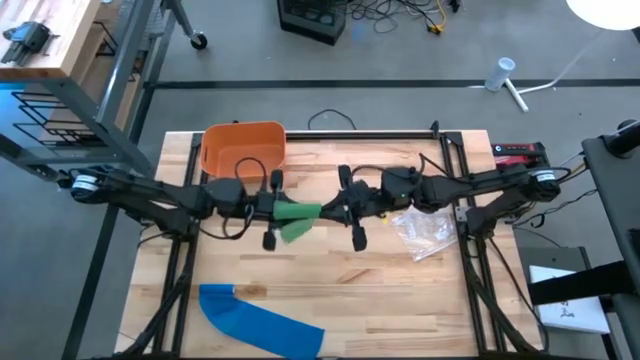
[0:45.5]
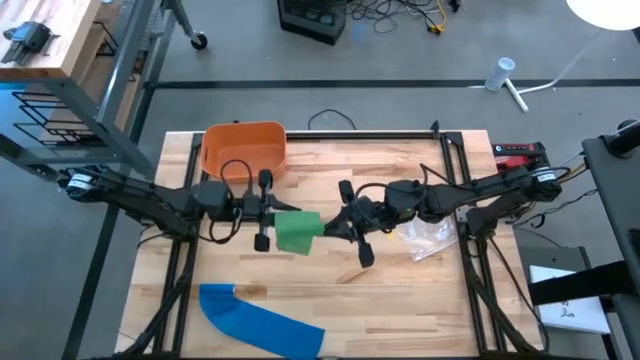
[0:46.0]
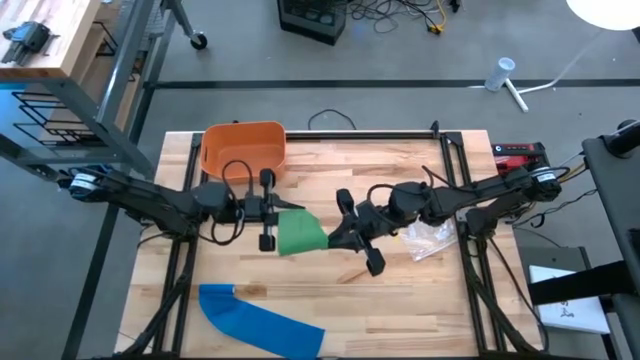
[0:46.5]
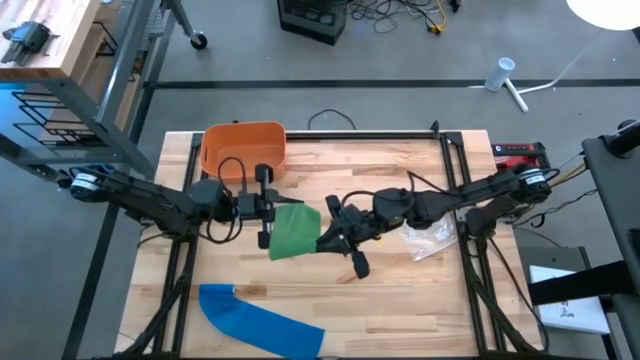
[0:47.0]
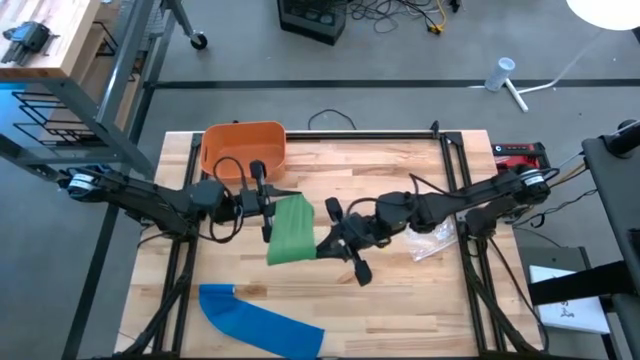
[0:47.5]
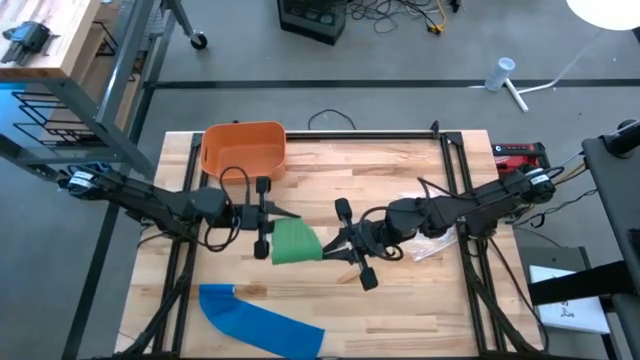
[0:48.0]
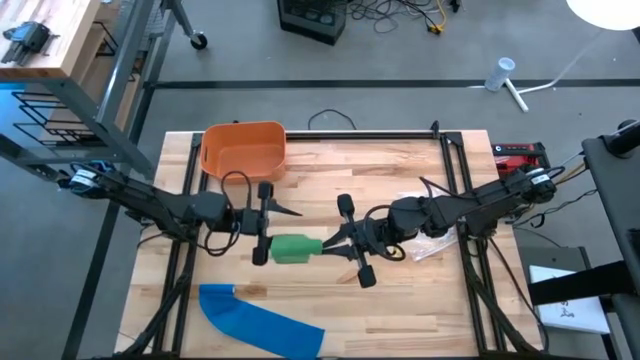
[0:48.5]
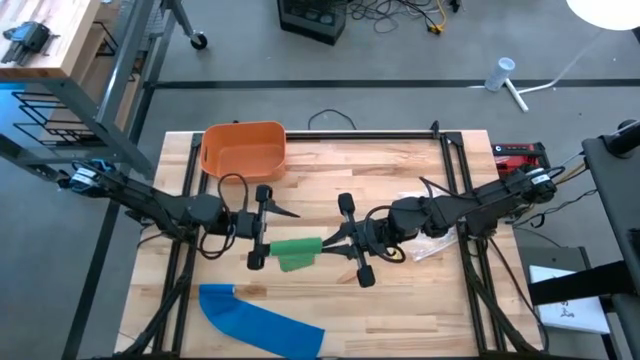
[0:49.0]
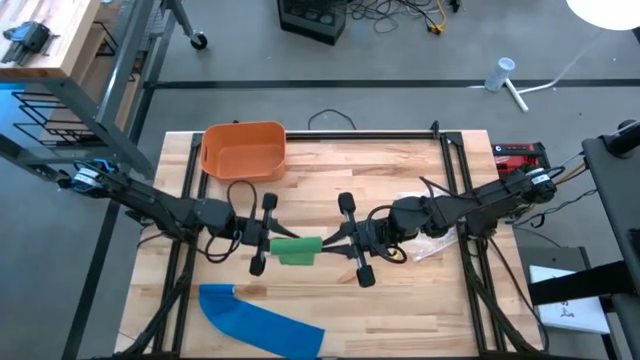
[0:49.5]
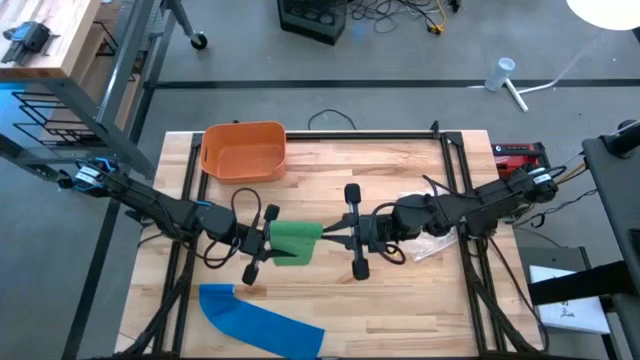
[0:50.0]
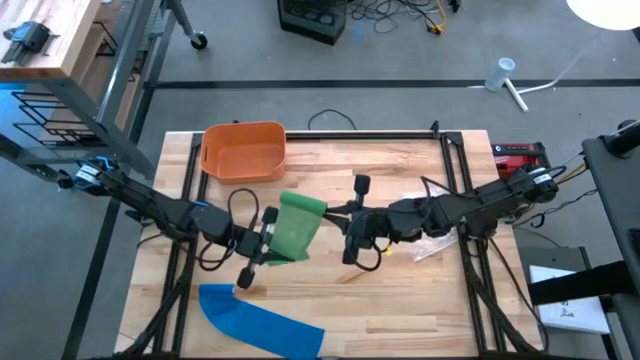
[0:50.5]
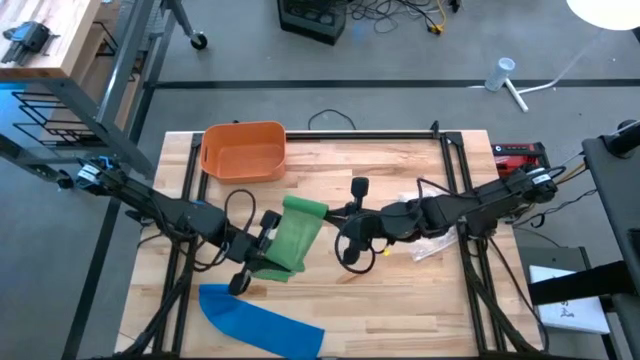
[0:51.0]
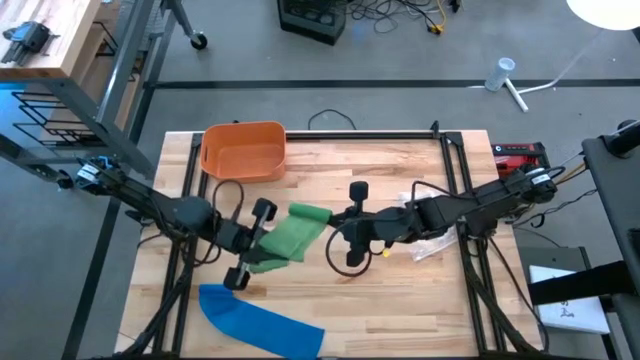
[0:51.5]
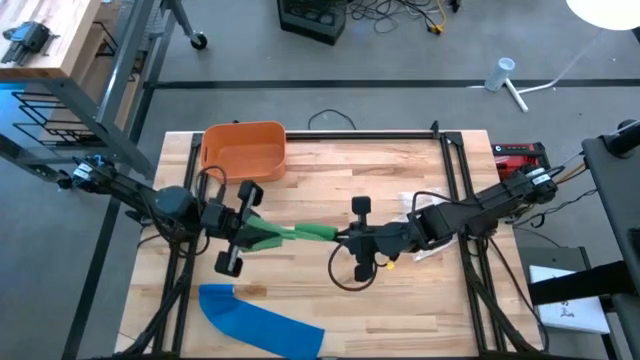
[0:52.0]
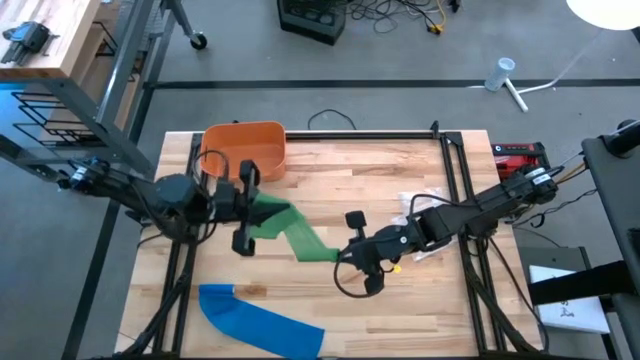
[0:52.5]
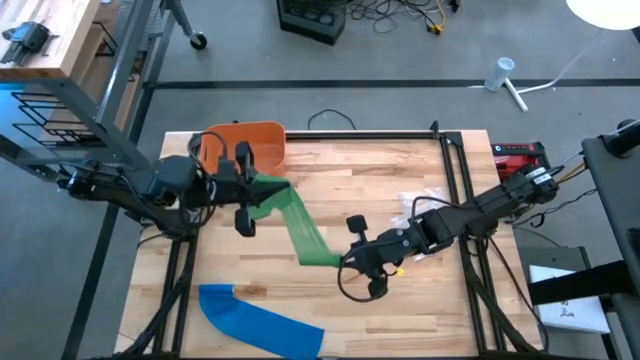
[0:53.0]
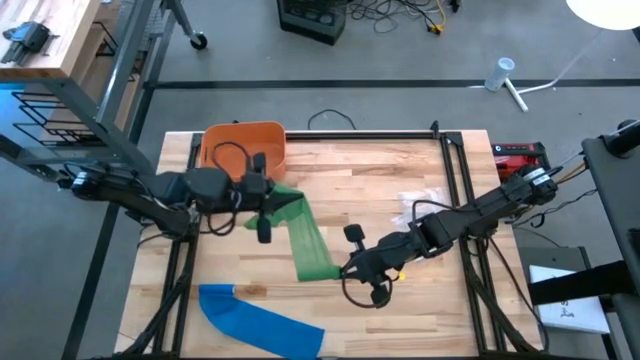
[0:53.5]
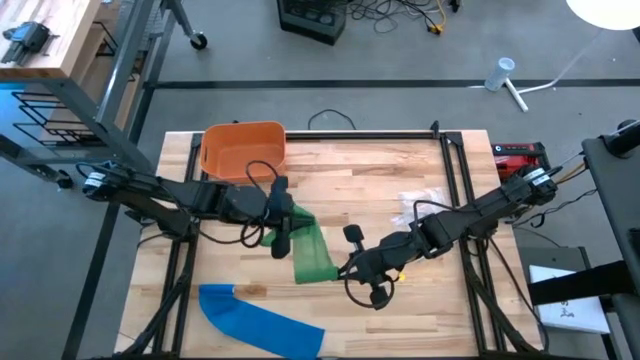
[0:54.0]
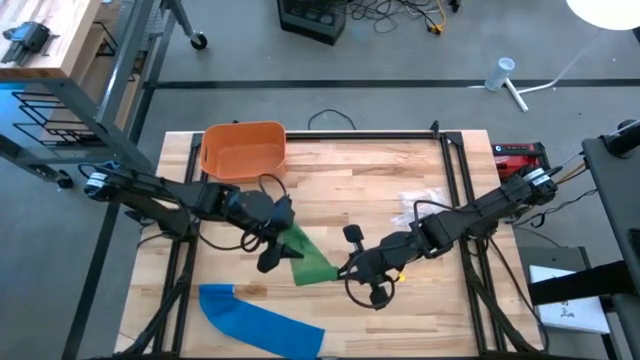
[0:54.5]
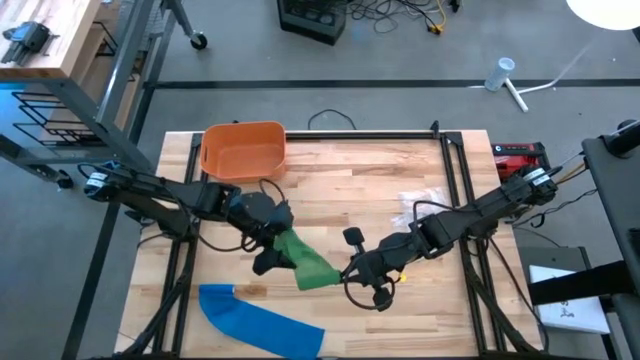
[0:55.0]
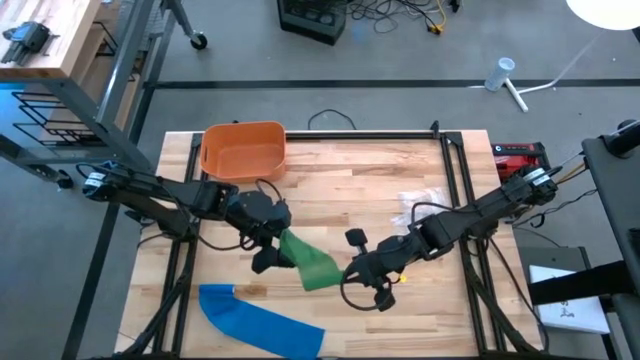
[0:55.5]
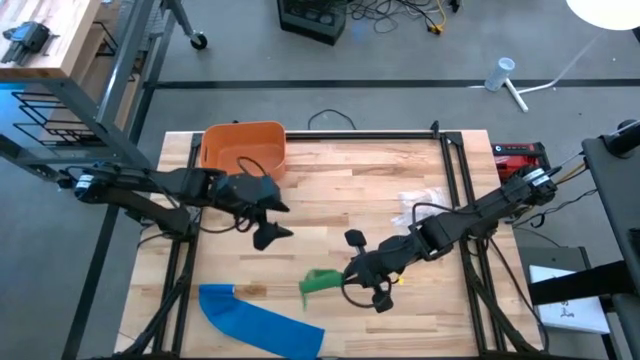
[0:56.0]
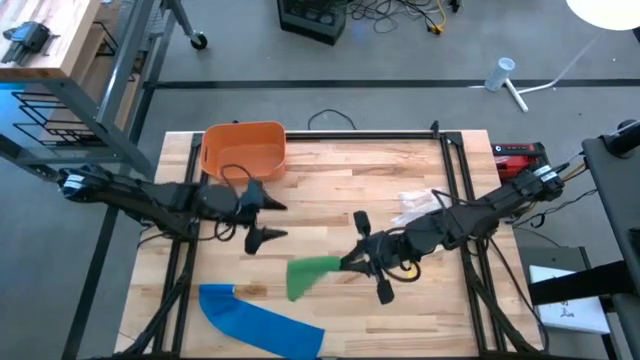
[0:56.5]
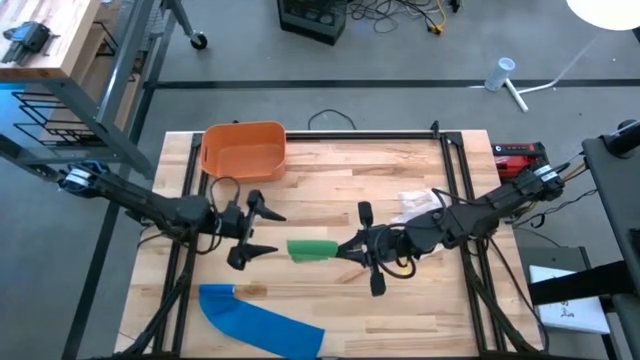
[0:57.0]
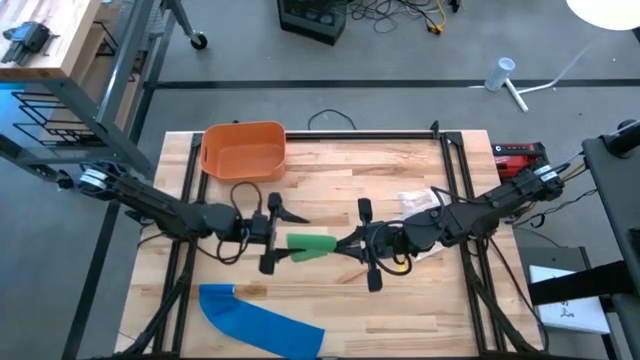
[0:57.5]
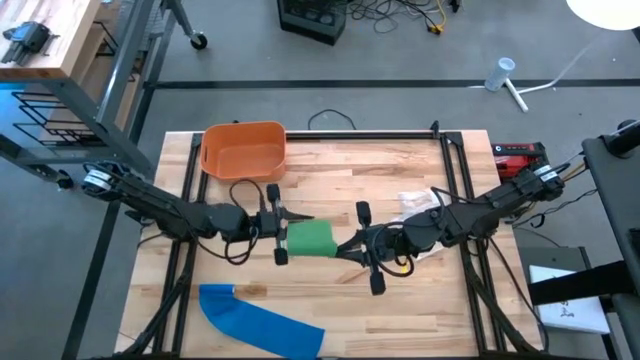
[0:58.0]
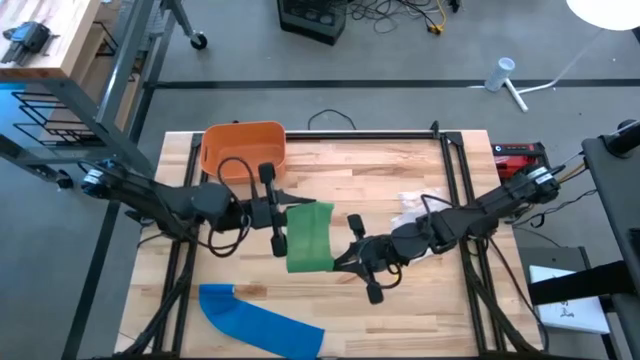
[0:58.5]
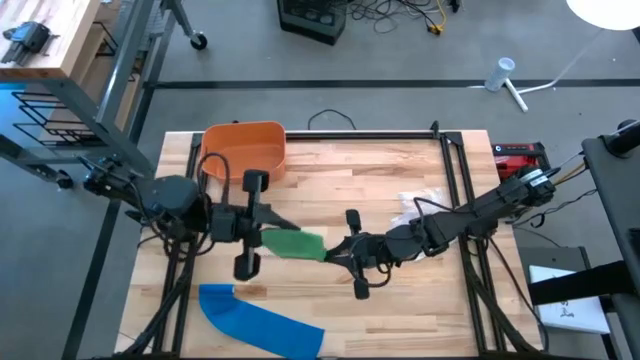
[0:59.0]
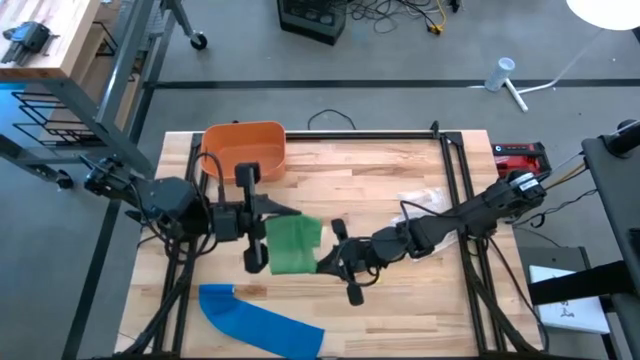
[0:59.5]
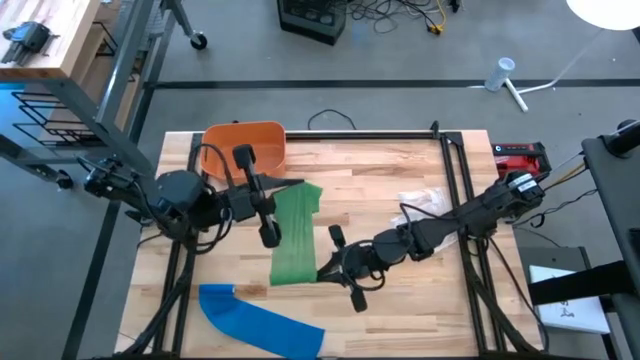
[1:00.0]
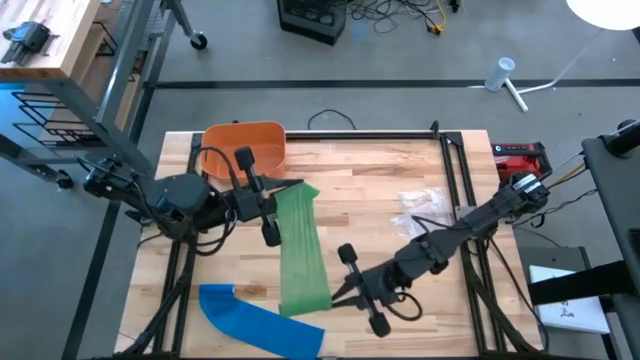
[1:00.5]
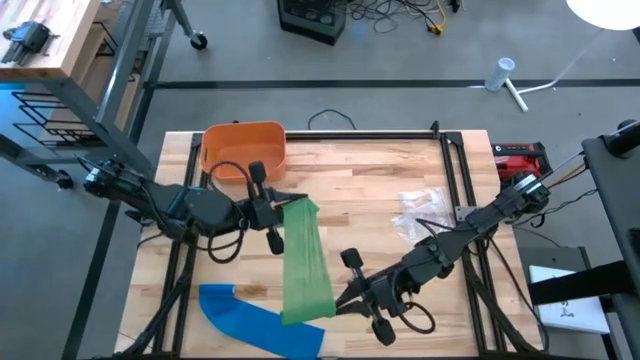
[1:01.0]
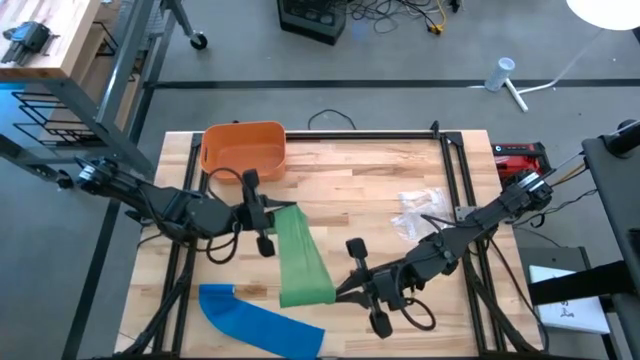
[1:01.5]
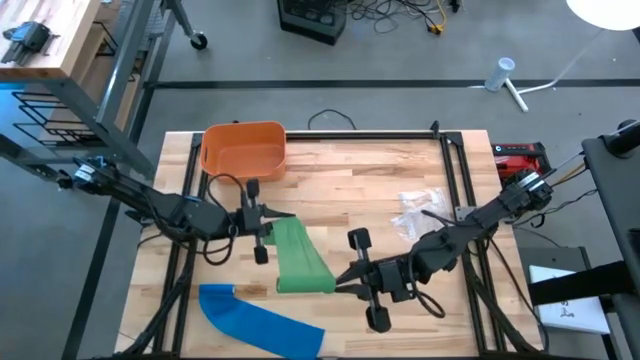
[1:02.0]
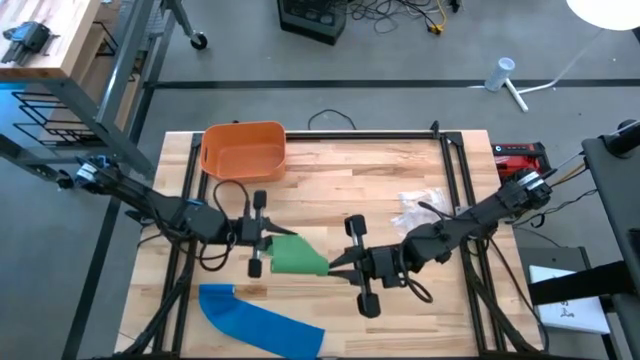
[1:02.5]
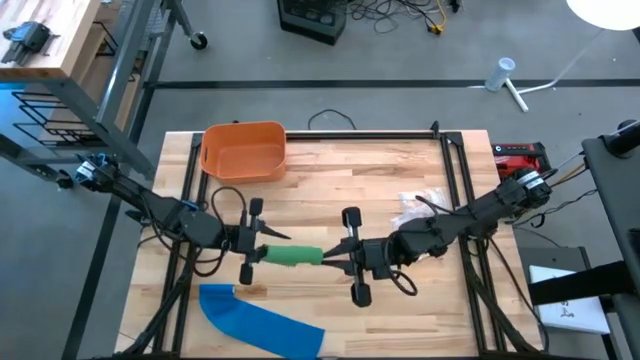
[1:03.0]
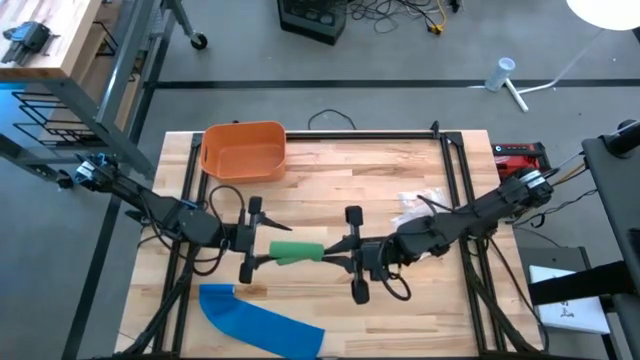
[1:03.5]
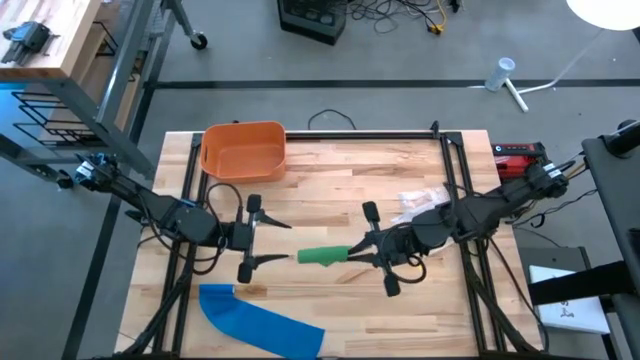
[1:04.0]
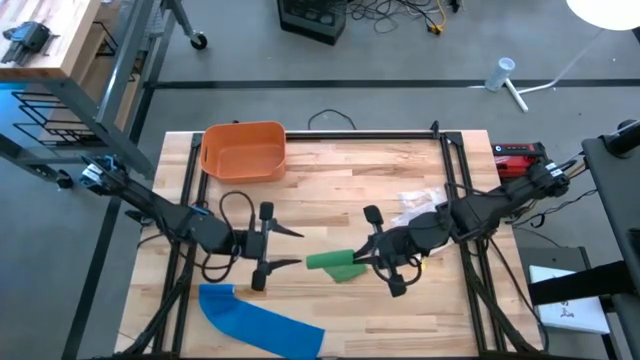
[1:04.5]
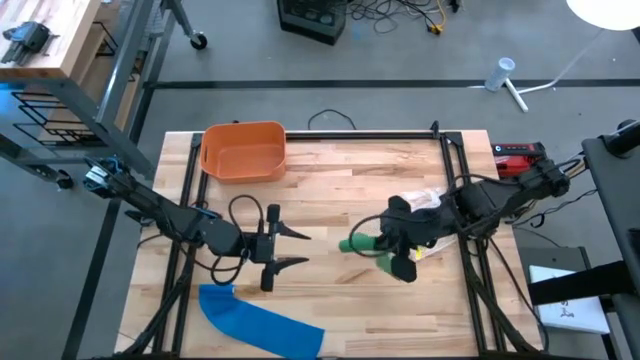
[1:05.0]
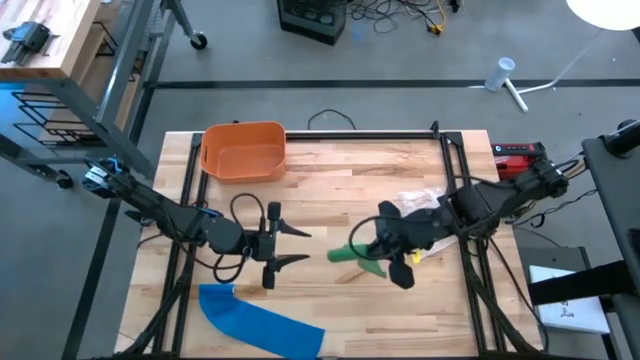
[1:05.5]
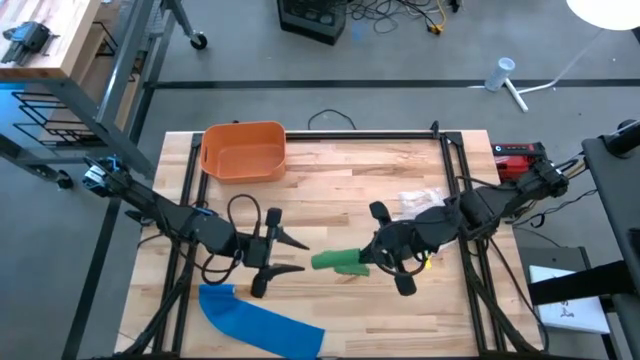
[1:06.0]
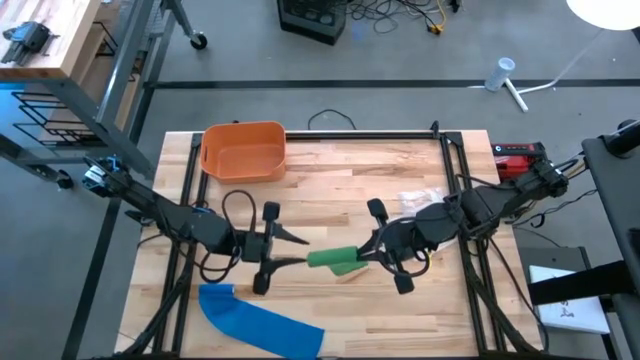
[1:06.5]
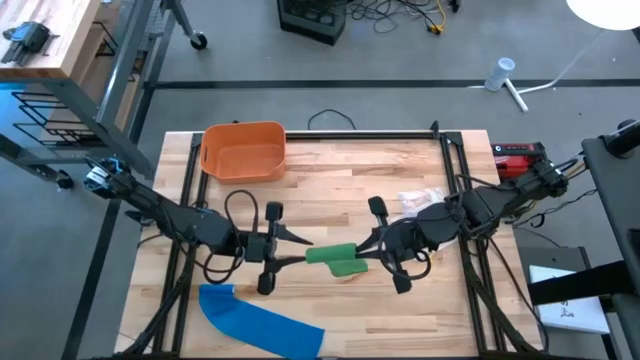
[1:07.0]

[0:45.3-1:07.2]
Task: Roll bandage
Roll the green bandage
